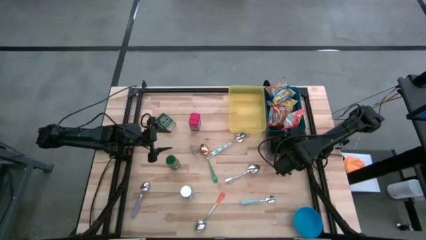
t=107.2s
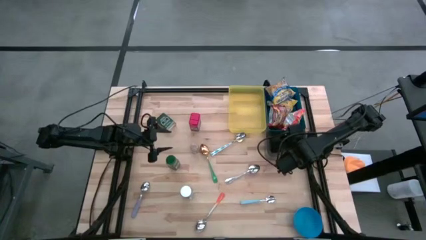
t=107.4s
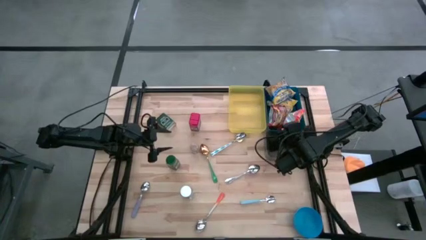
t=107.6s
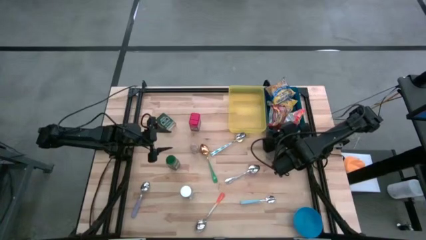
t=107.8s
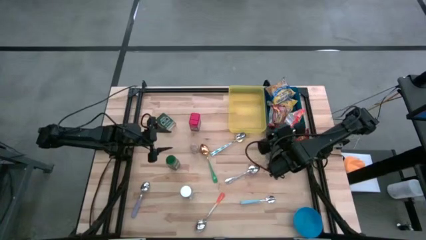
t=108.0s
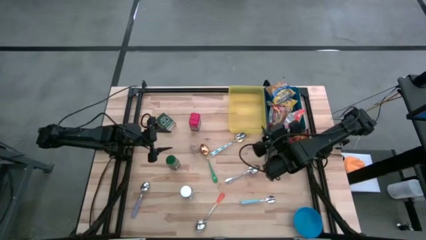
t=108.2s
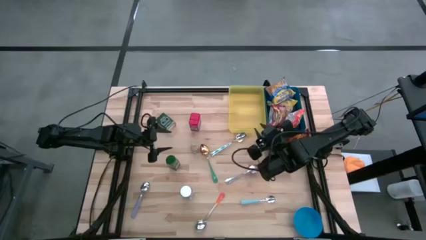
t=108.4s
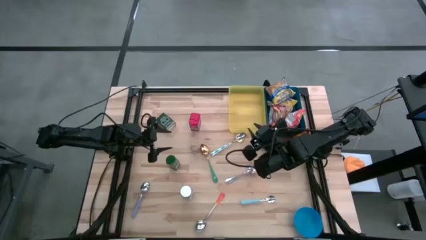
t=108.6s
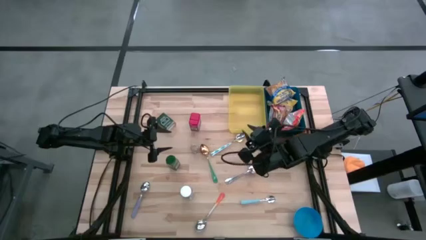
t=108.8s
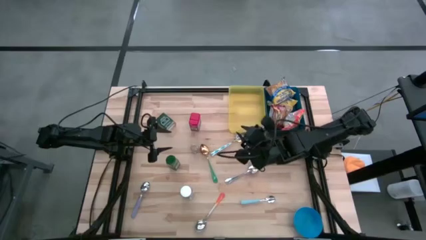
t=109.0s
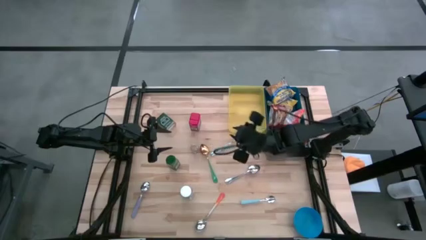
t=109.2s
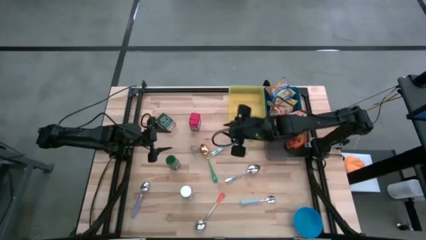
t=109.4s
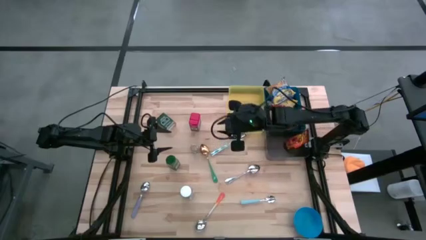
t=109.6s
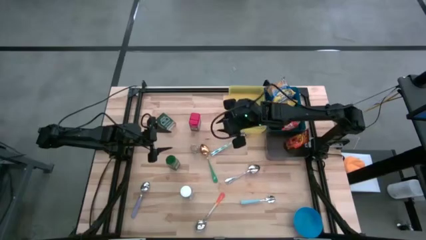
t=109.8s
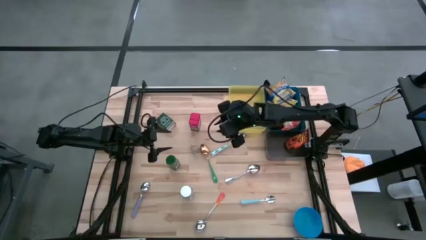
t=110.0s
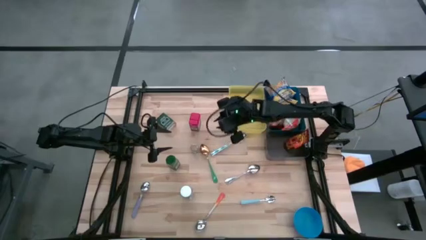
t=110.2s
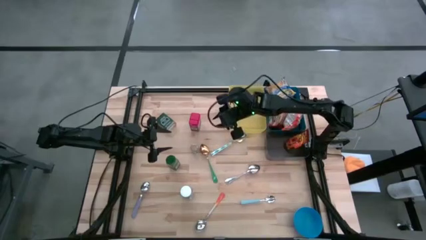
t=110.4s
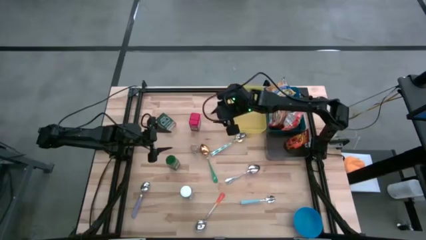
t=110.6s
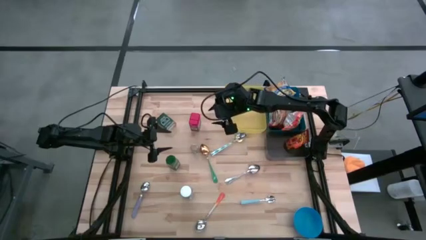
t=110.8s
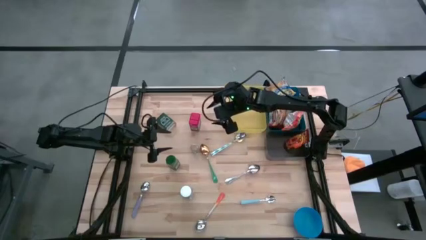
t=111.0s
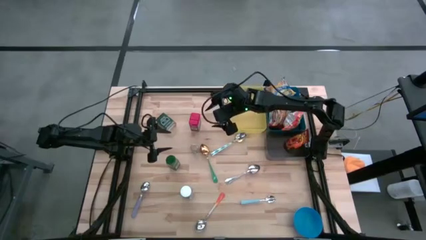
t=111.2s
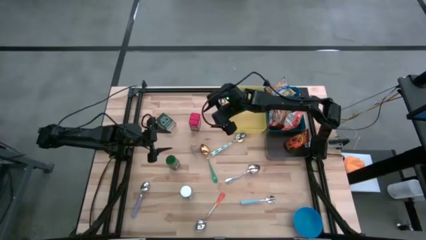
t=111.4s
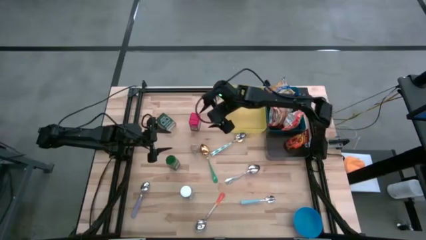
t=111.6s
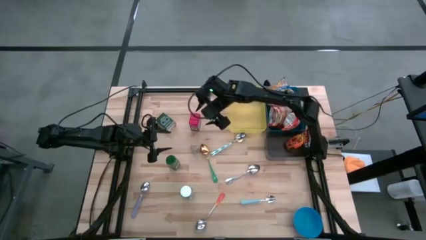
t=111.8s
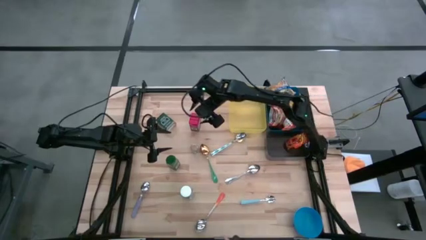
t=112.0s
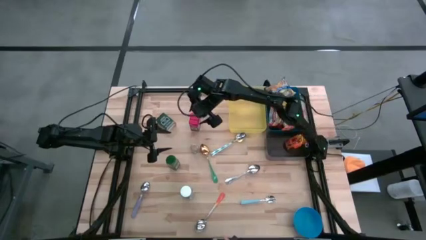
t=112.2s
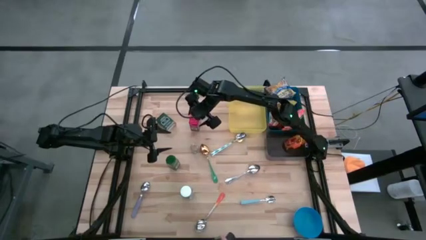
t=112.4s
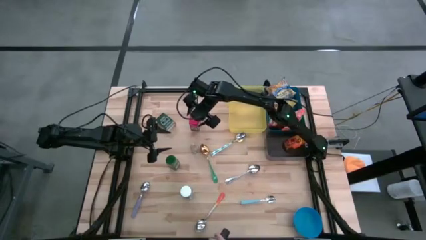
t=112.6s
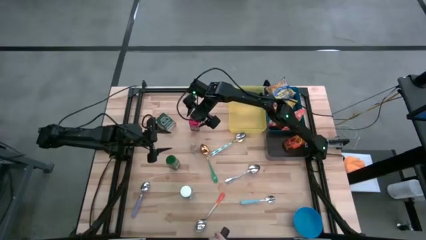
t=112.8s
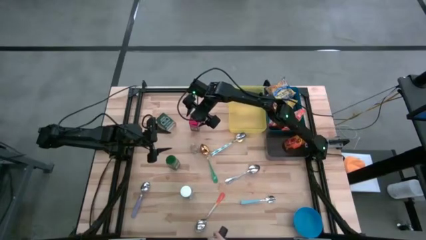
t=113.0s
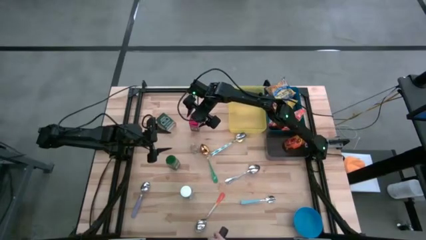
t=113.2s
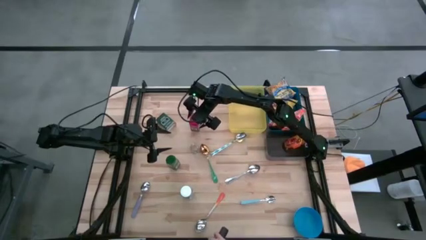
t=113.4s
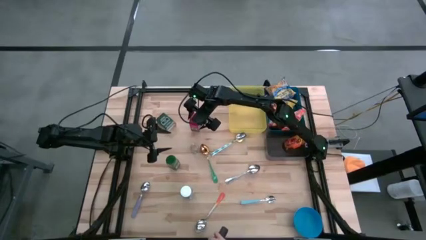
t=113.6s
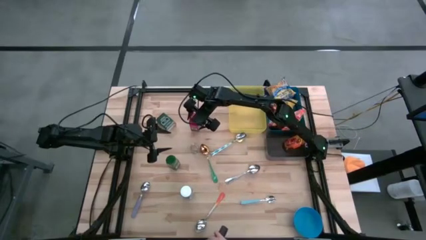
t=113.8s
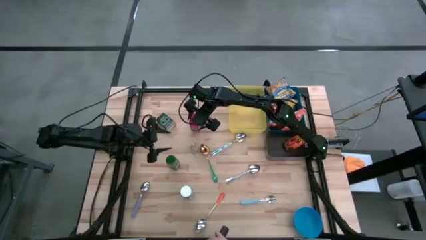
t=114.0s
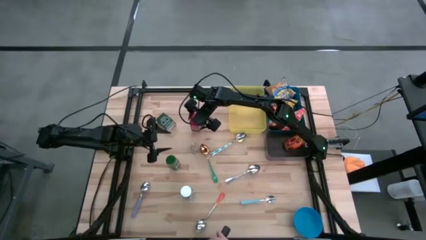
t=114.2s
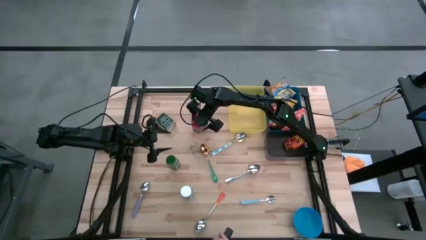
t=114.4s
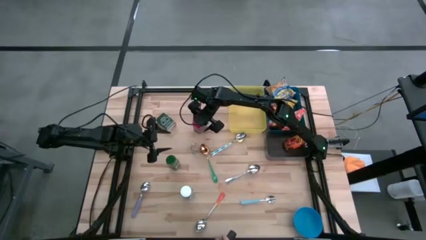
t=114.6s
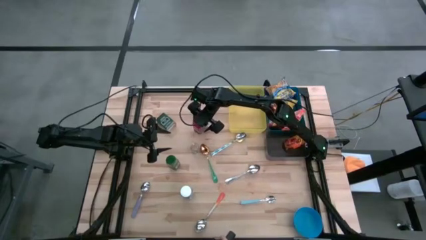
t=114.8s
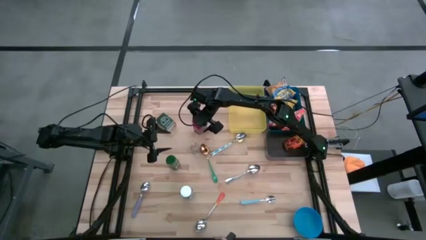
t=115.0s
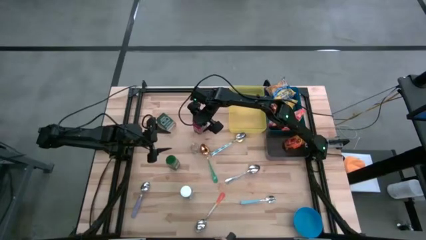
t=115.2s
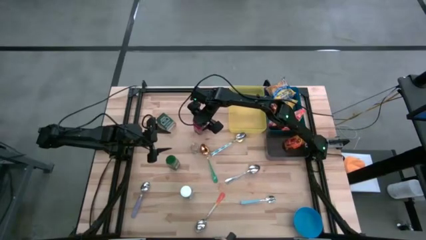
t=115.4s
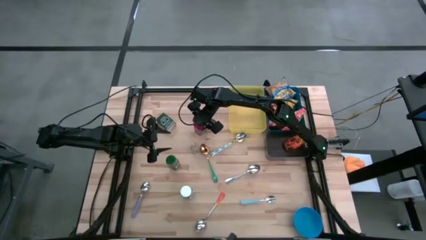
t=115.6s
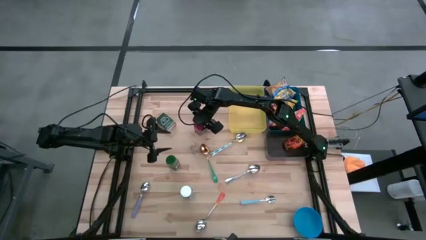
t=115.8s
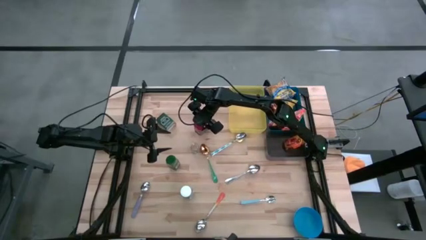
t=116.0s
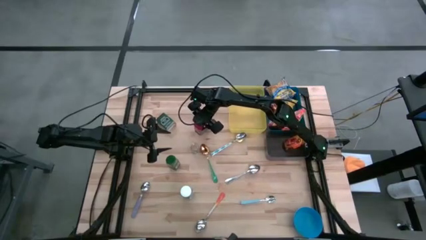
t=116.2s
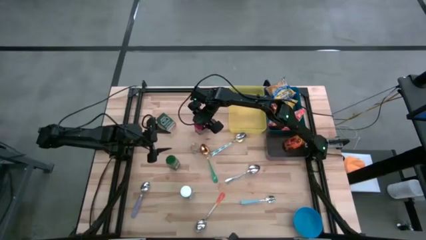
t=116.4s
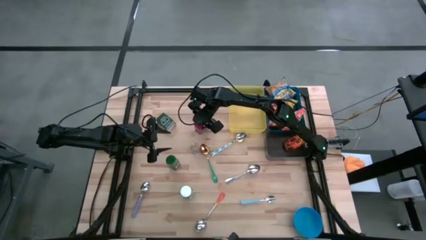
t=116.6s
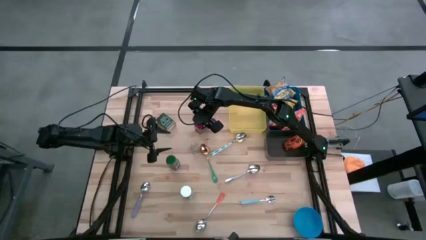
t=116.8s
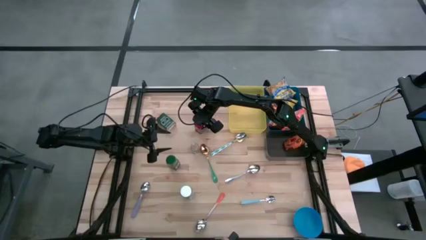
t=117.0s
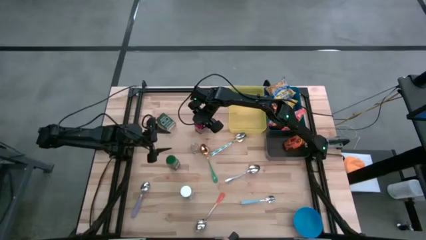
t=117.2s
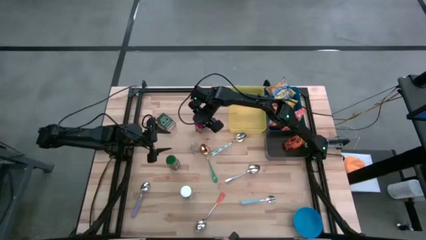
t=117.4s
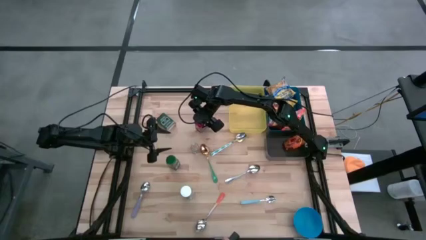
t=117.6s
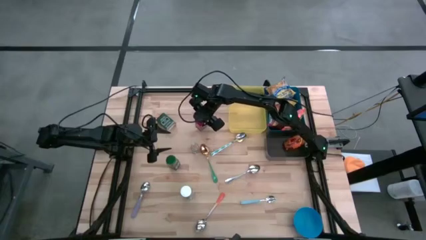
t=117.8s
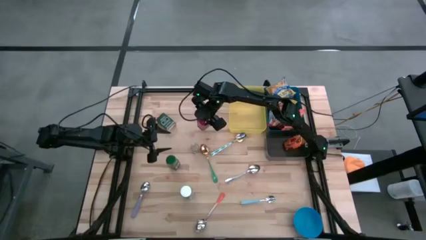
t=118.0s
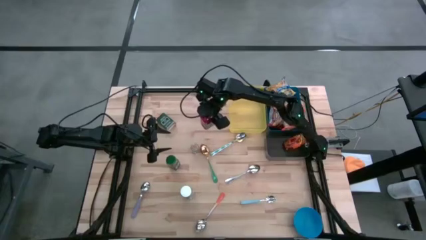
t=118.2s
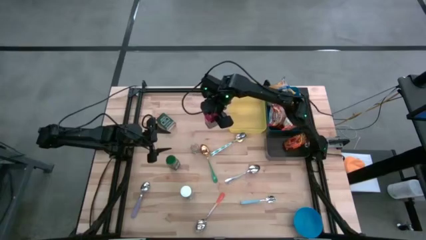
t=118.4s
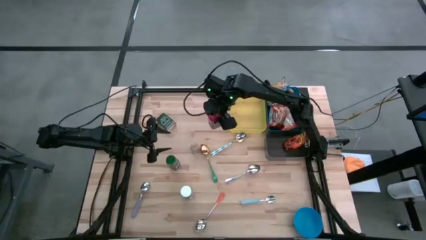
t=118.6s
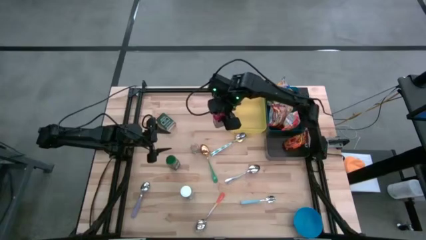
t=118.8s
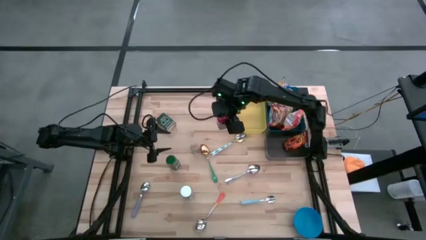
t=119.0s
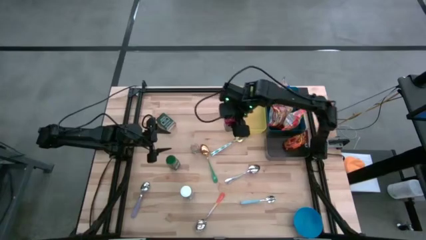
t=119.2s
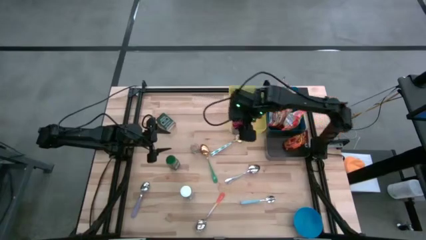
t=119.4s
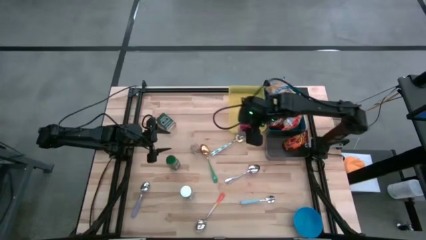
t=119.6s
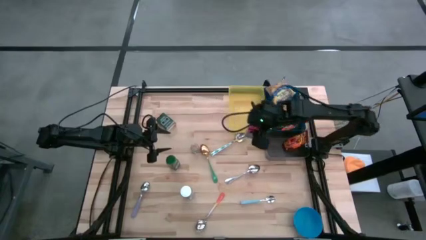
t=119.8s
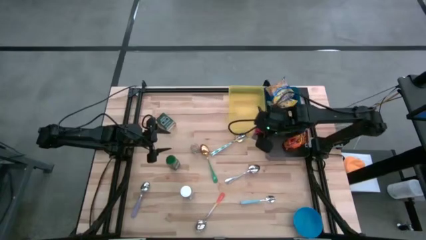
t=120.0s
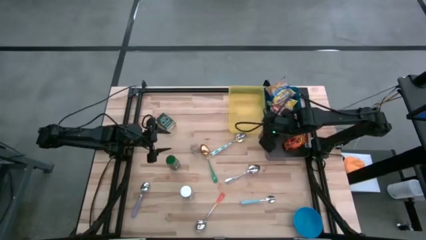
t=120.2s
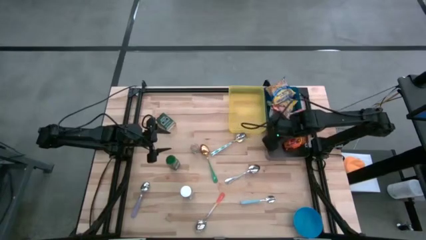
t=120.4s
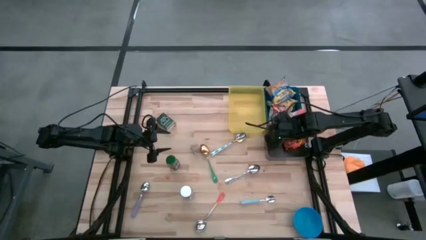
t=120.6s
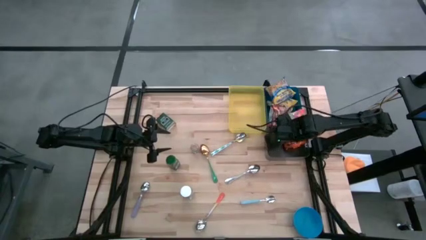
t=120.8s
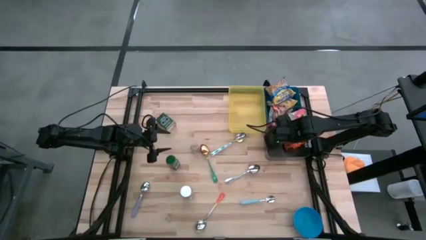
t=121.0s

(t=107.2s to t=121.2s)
Put the red seasoning can into the black bin
